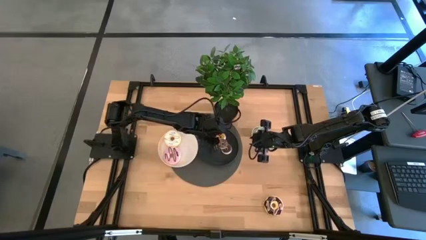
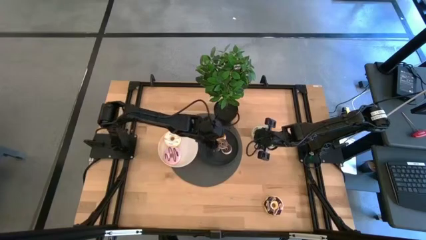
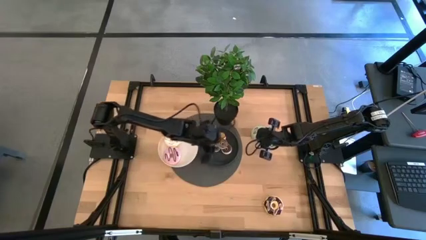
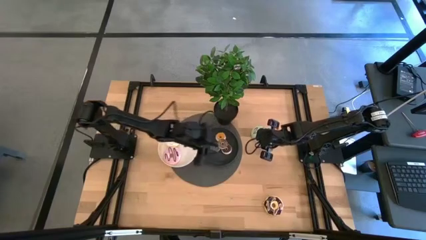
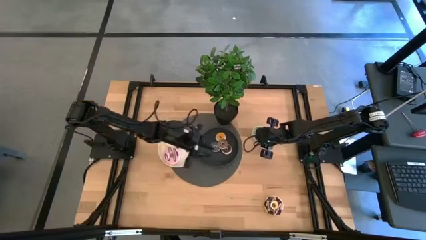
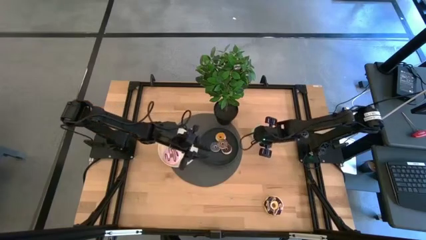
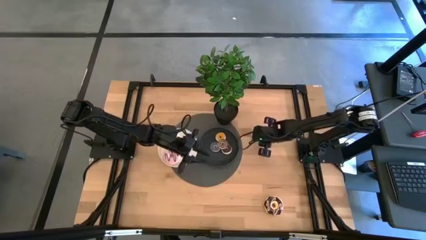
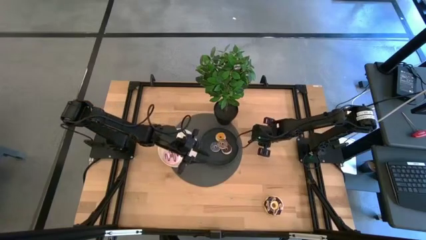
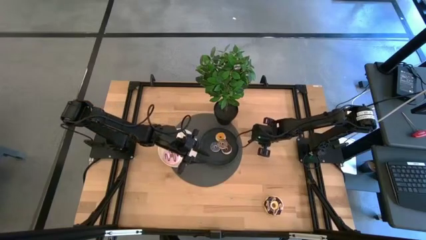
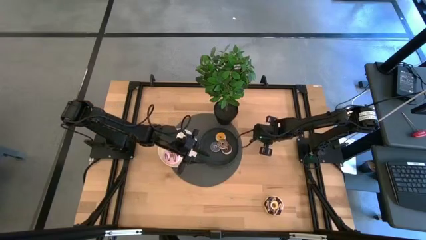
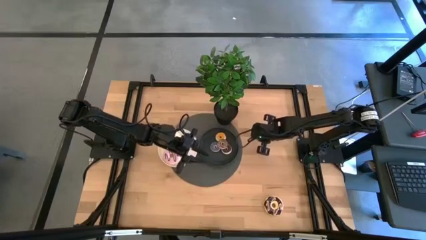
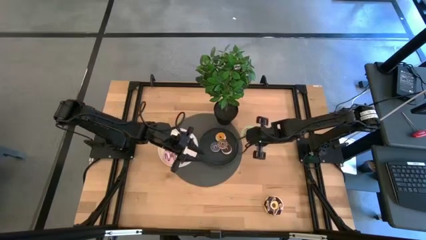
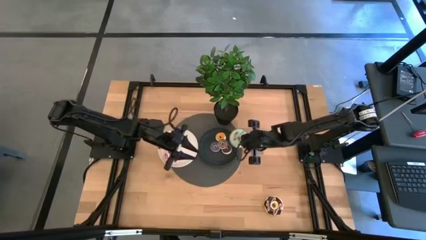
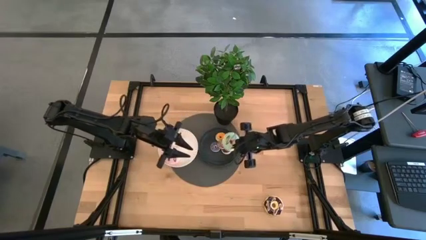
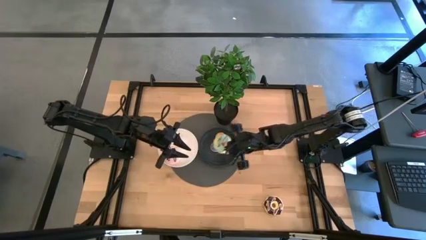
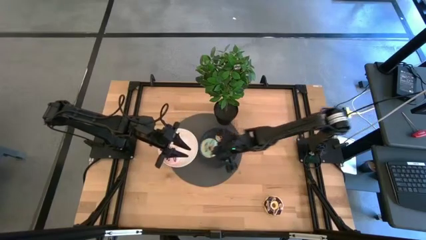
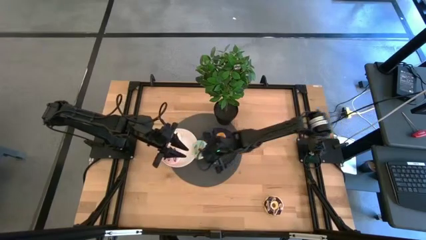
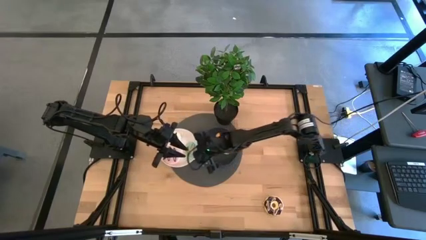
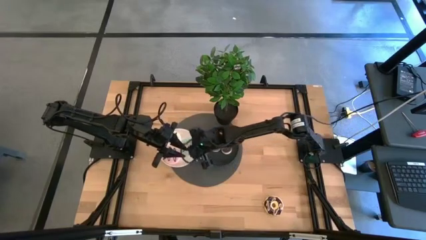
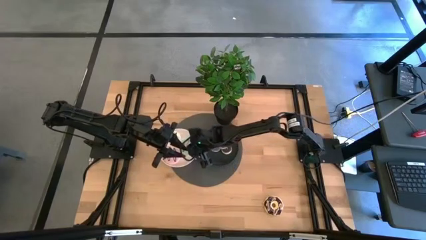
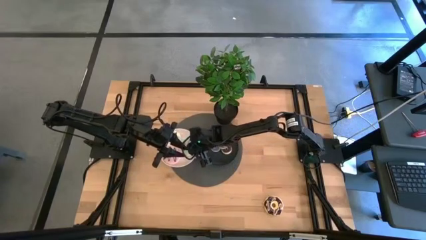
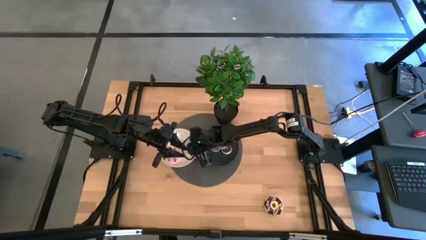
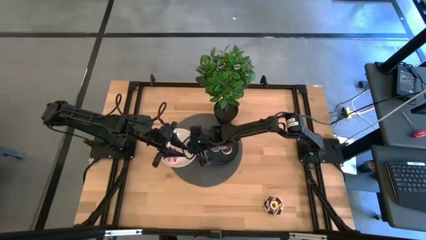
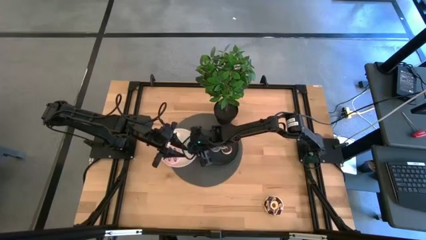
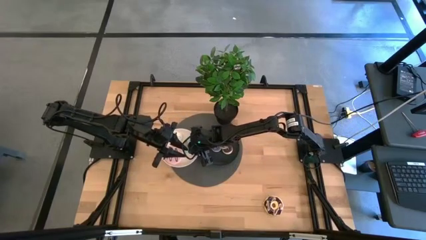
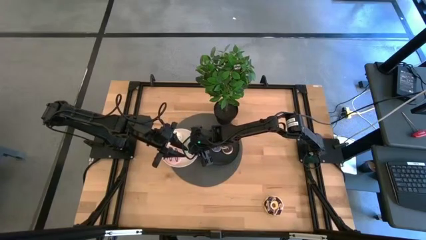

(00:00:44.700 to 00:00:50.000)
Task: Pick & Place donuts
Put the large blue donut on the white plate

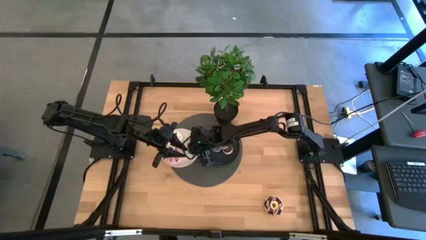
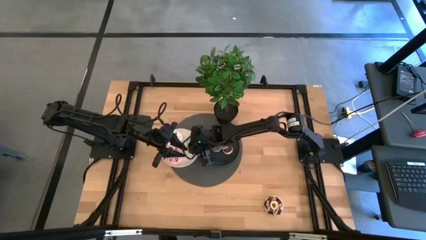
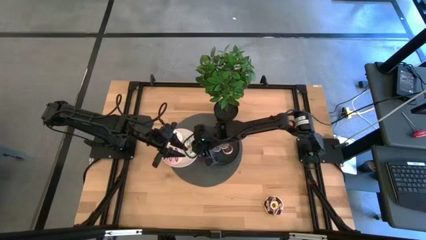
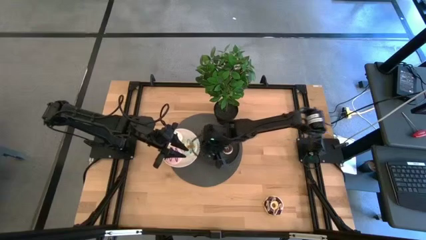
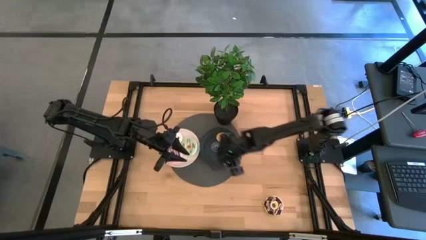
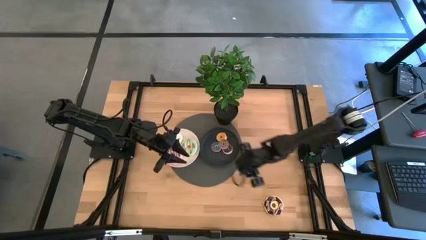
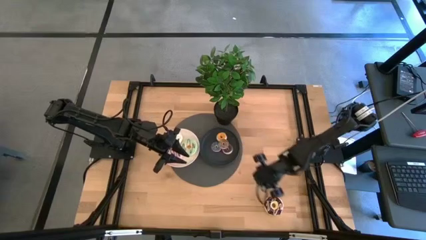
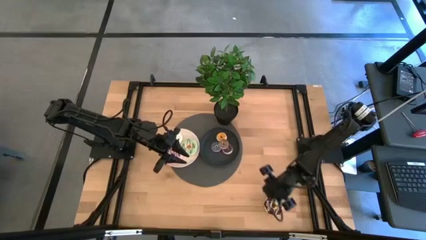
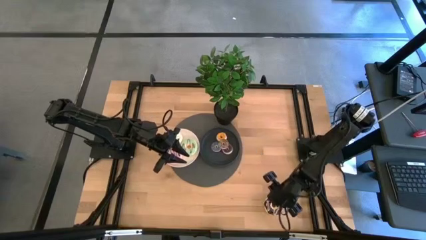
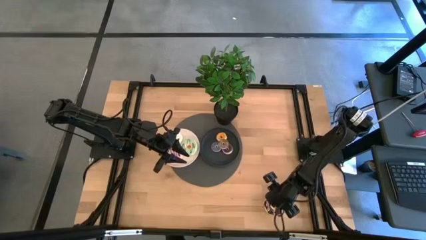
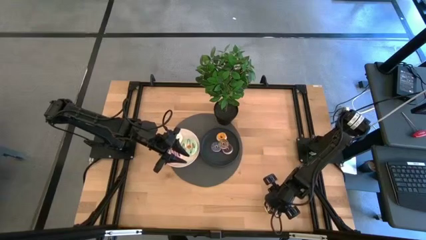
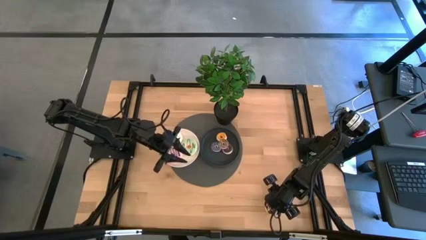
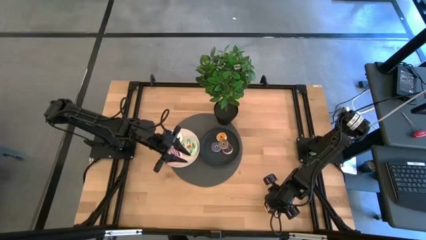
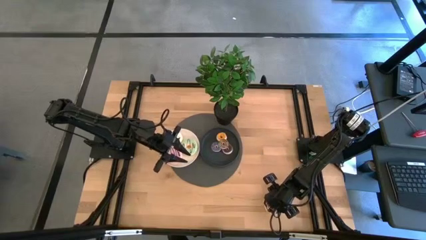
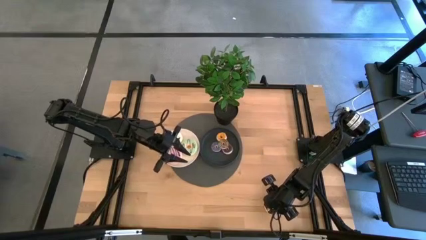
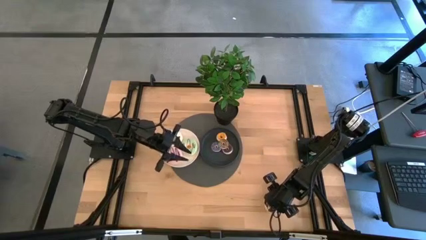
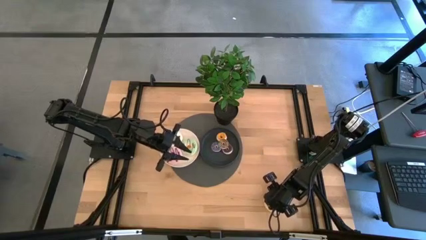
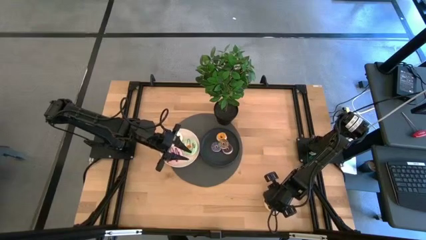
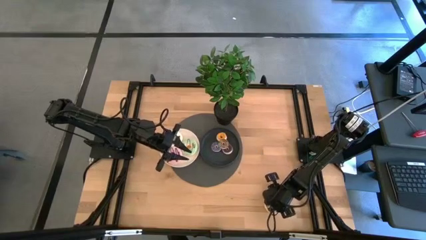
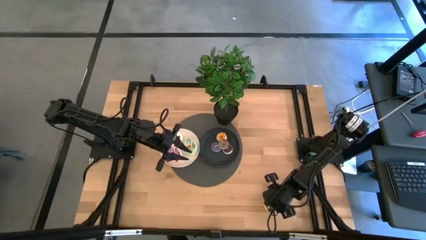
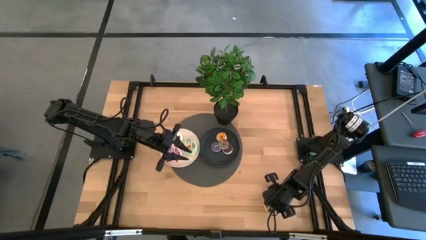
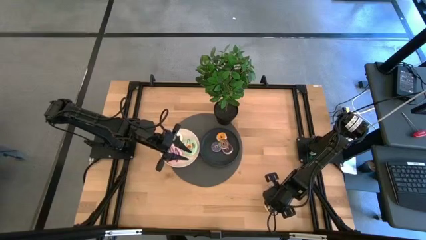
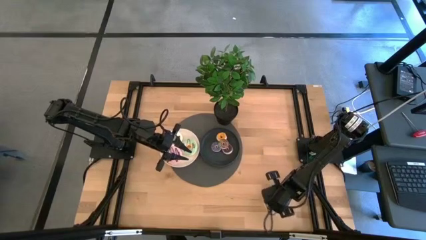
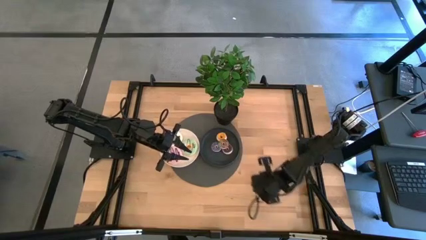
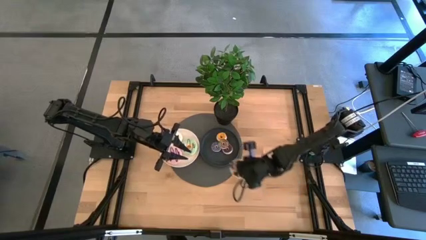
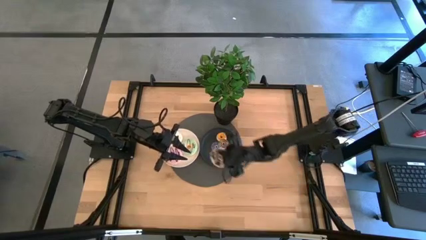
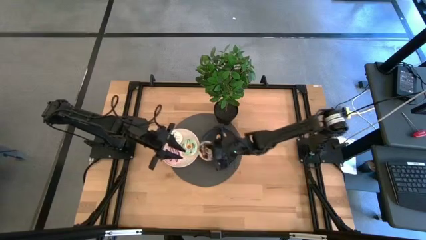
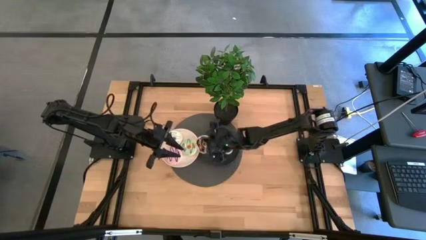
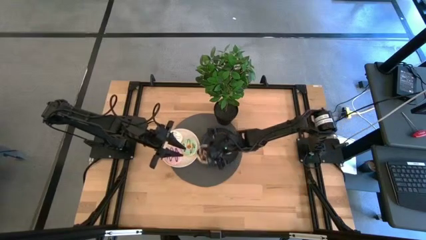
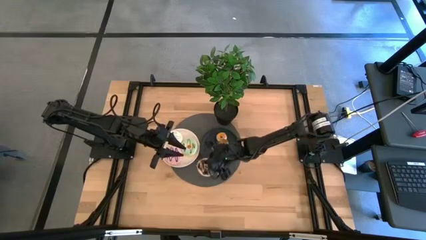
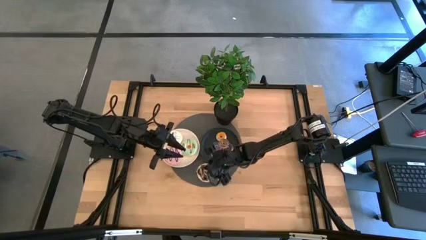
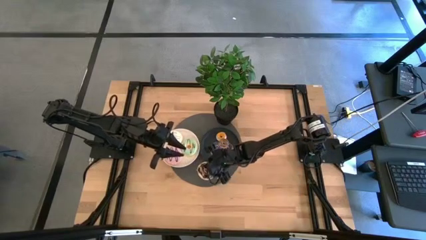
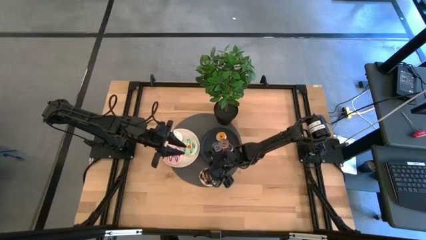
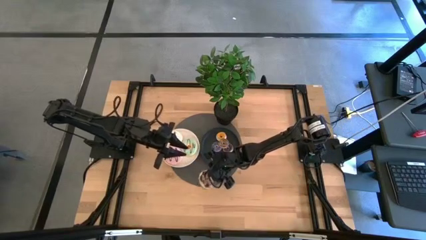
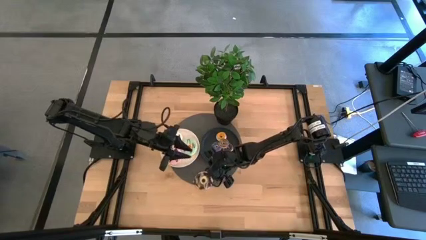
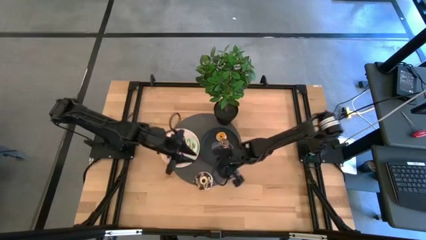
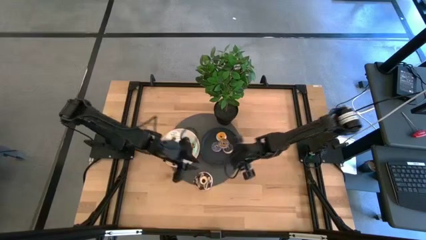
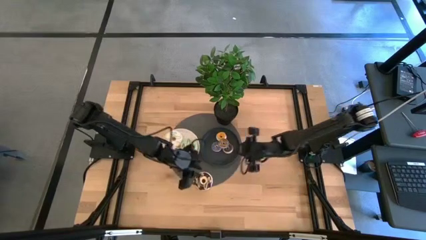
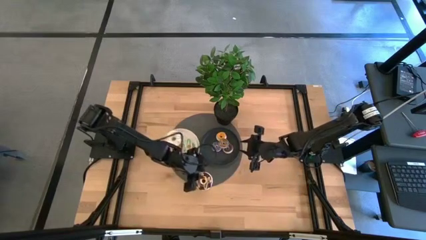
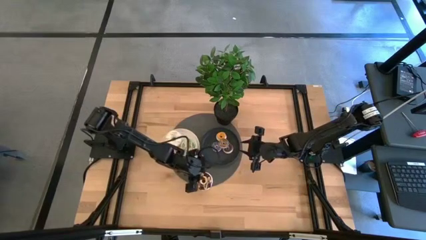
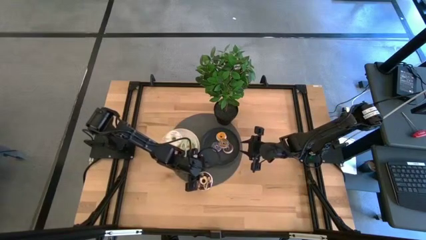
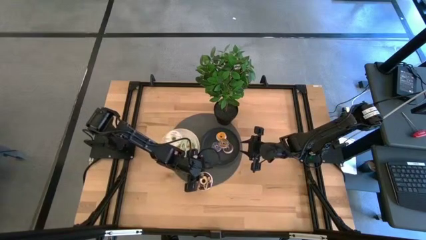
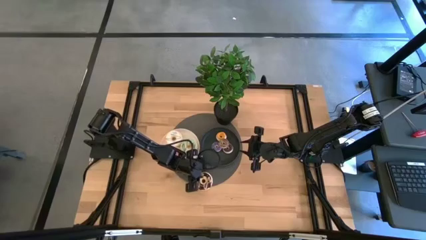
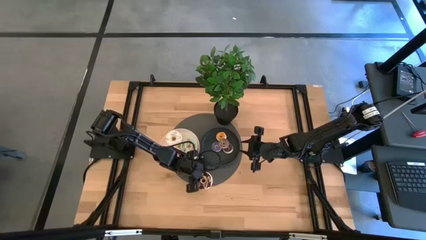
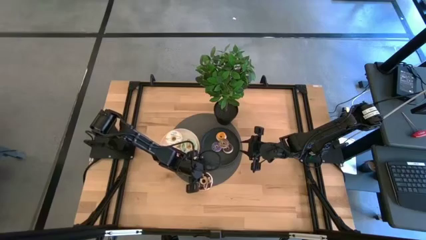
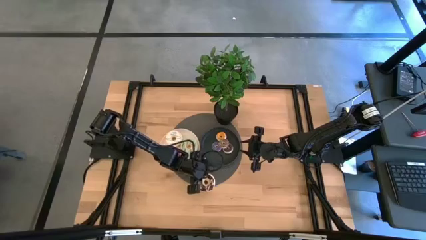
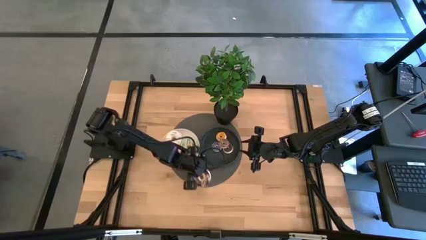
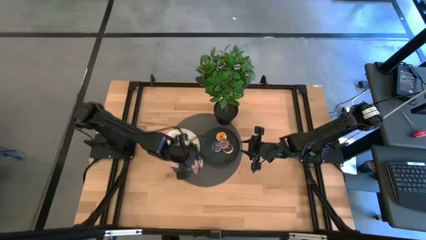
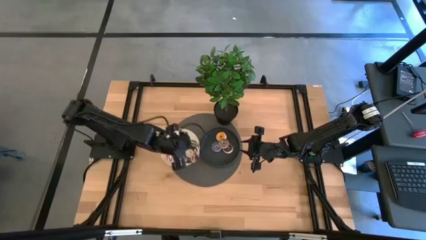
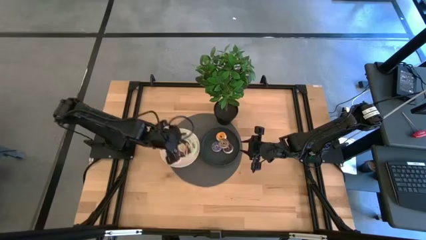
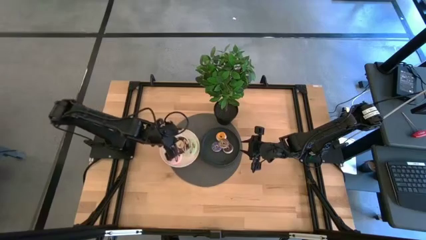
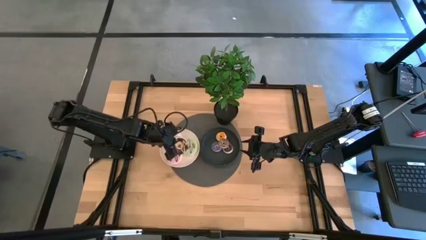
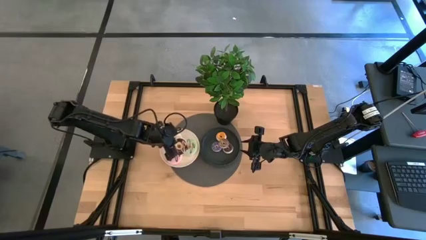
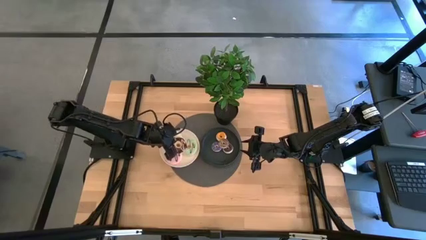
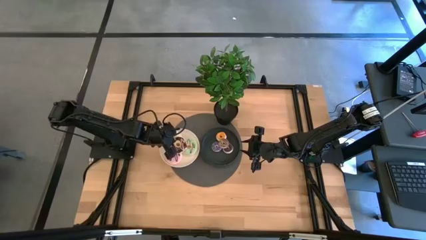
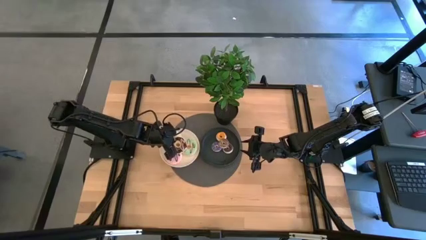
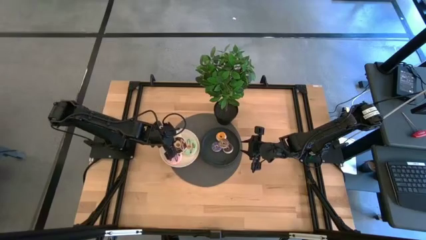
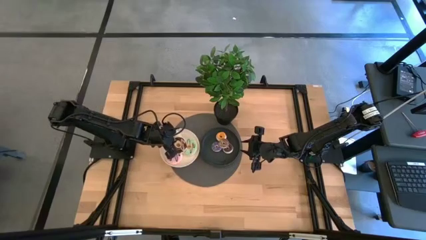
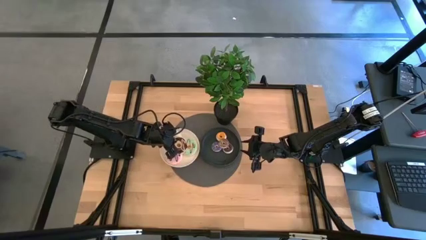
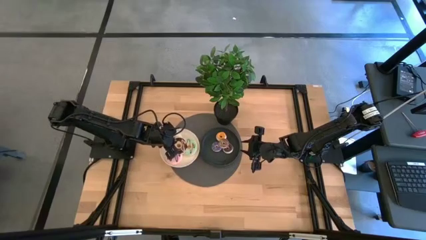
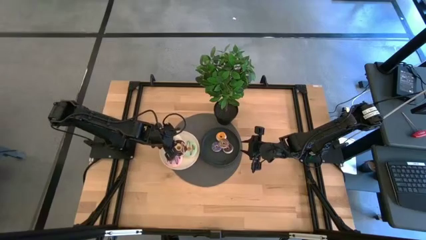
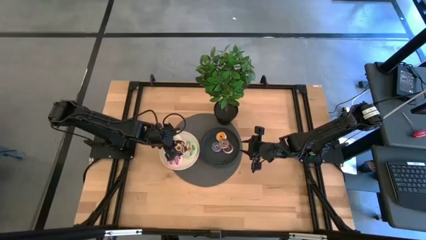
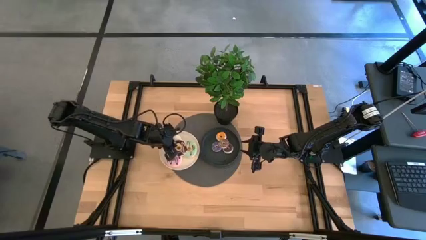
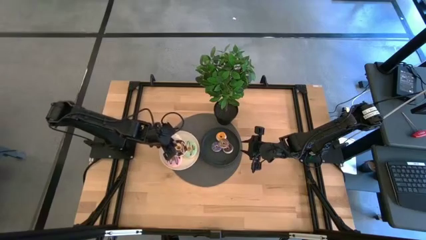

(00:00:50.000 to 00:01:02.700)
Put the large black donut on the white plate
